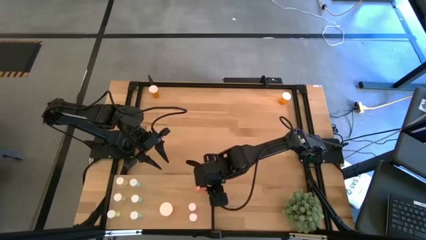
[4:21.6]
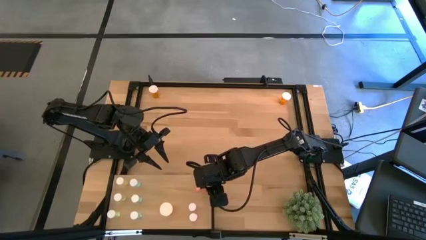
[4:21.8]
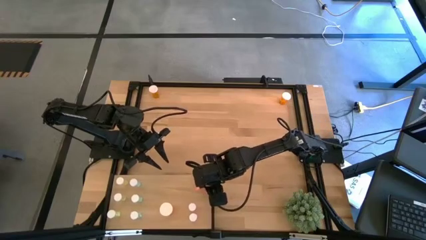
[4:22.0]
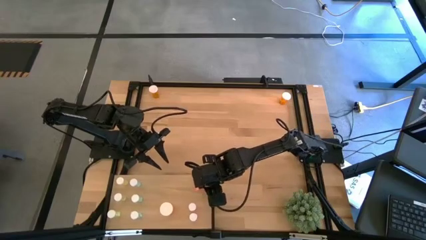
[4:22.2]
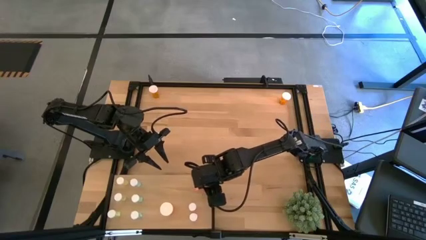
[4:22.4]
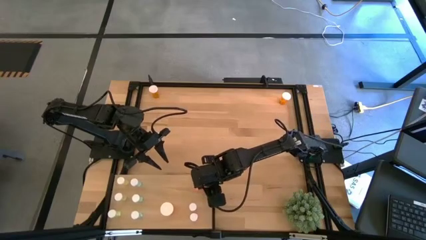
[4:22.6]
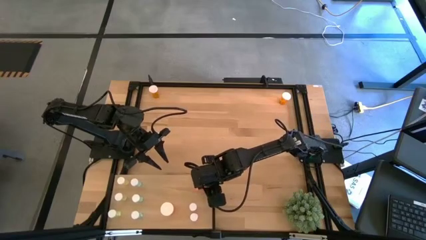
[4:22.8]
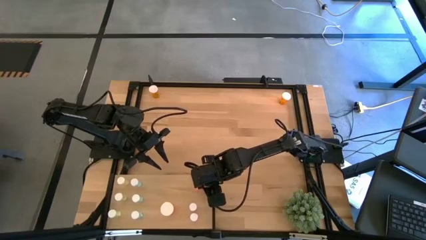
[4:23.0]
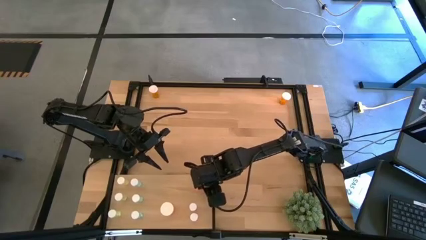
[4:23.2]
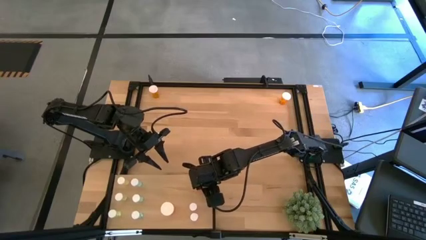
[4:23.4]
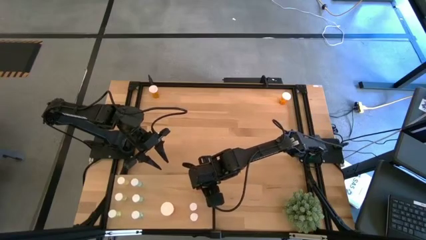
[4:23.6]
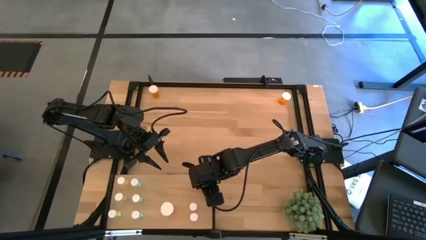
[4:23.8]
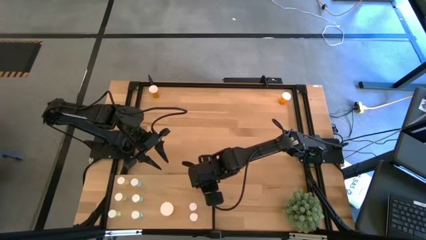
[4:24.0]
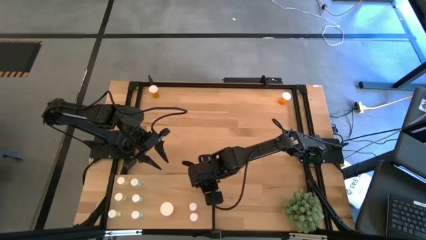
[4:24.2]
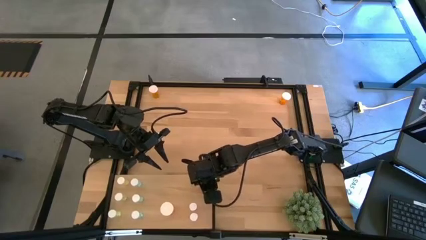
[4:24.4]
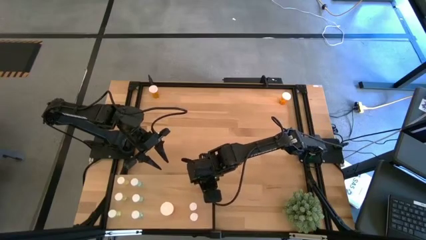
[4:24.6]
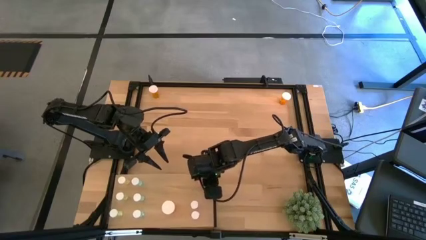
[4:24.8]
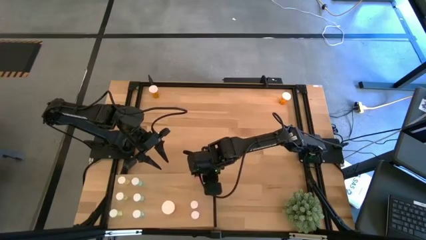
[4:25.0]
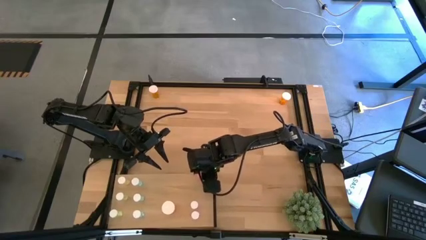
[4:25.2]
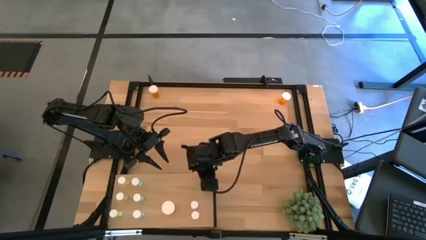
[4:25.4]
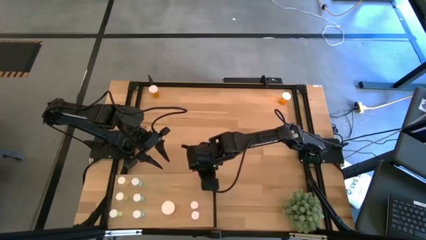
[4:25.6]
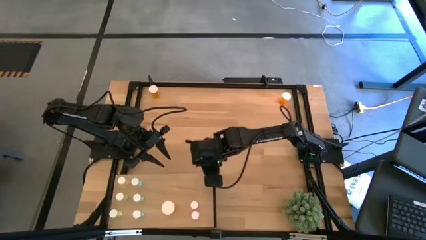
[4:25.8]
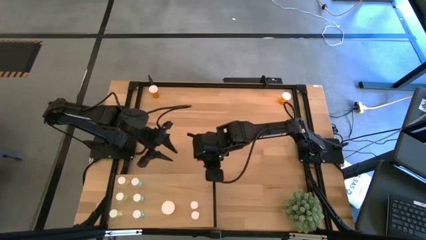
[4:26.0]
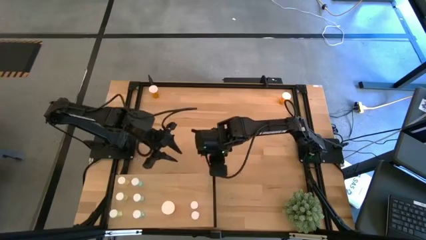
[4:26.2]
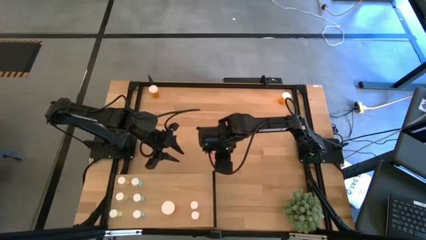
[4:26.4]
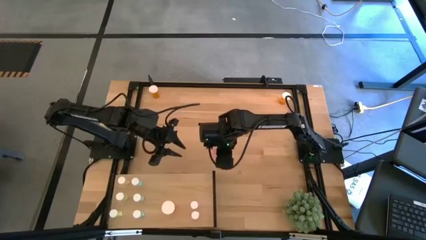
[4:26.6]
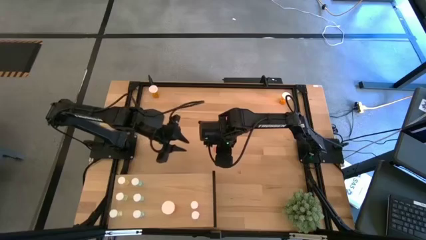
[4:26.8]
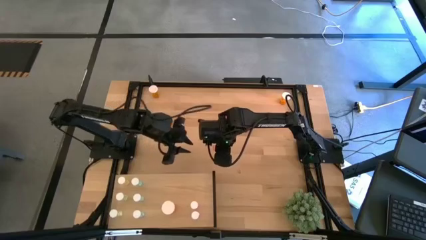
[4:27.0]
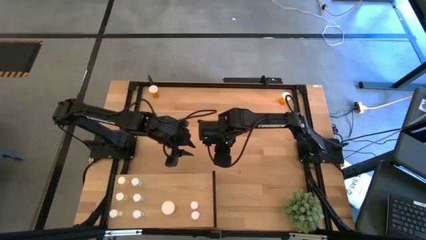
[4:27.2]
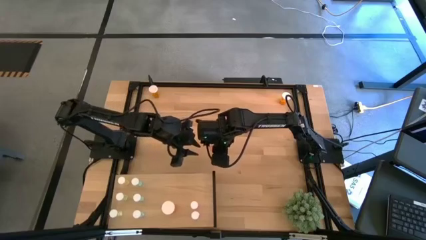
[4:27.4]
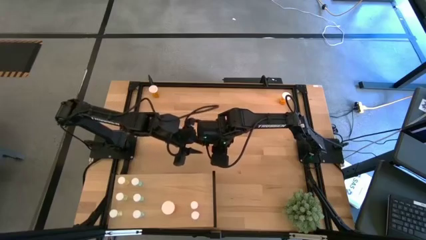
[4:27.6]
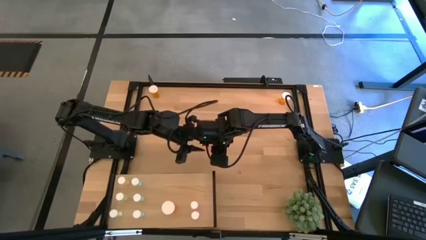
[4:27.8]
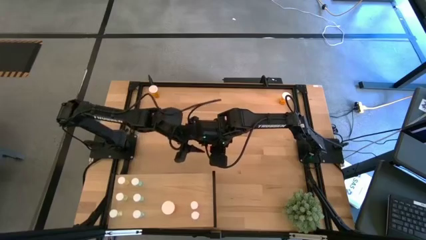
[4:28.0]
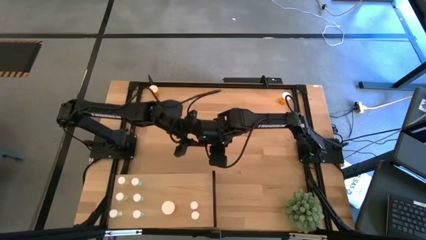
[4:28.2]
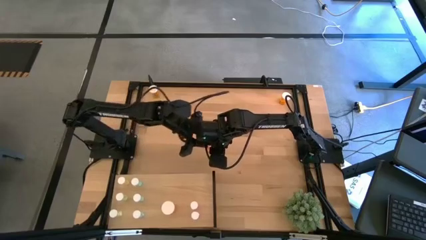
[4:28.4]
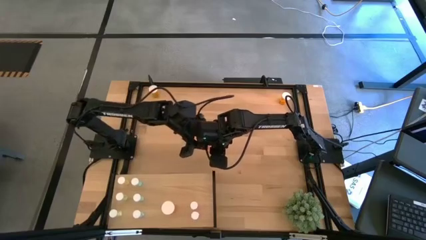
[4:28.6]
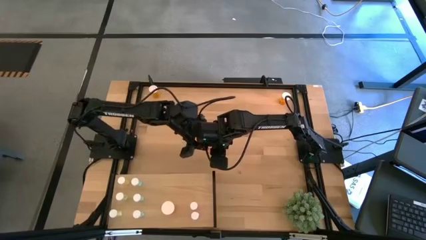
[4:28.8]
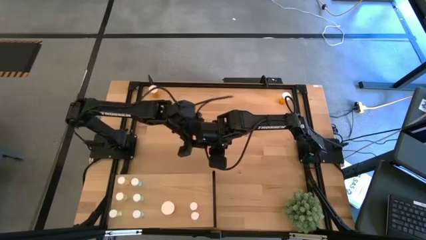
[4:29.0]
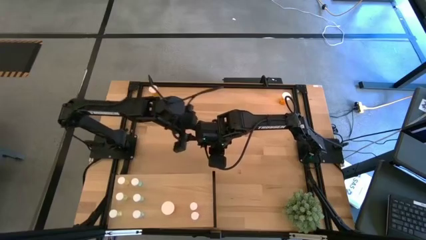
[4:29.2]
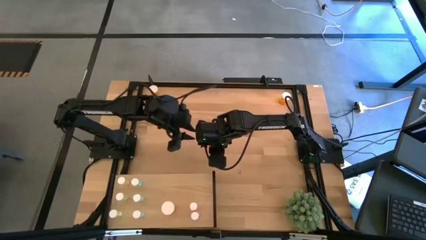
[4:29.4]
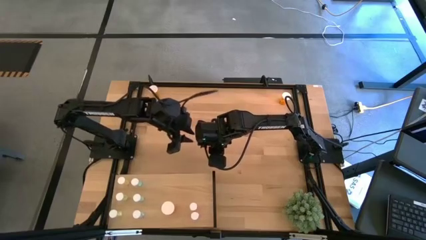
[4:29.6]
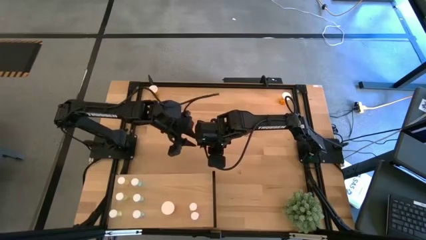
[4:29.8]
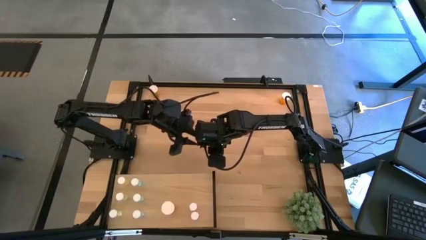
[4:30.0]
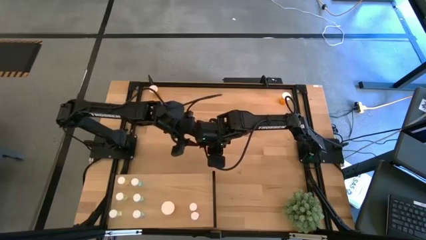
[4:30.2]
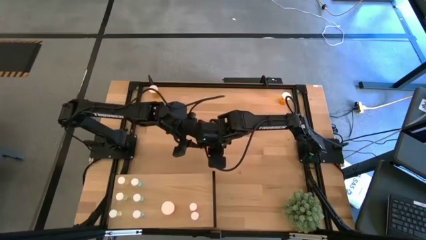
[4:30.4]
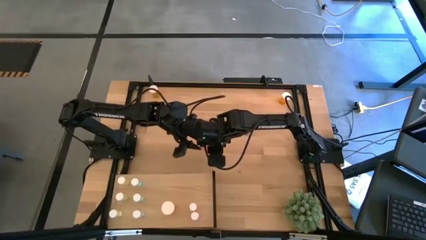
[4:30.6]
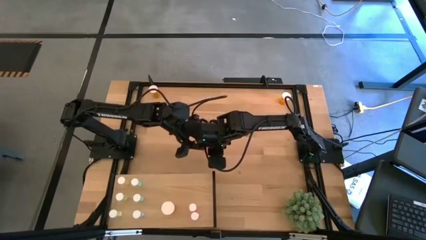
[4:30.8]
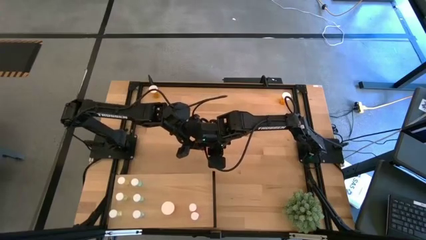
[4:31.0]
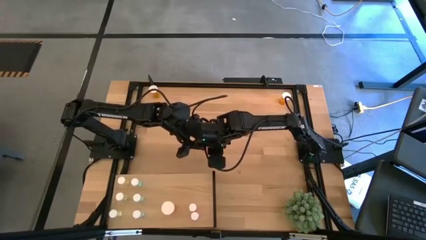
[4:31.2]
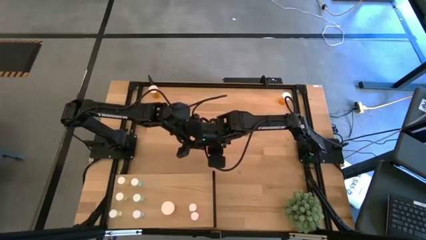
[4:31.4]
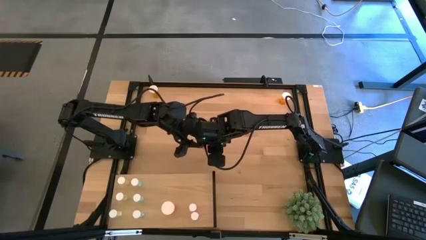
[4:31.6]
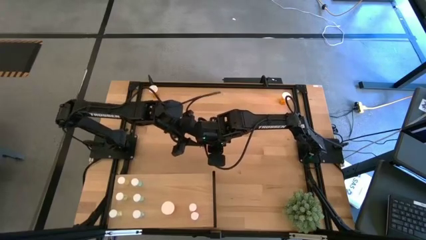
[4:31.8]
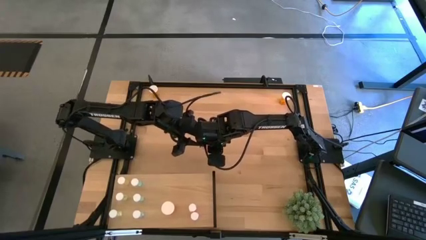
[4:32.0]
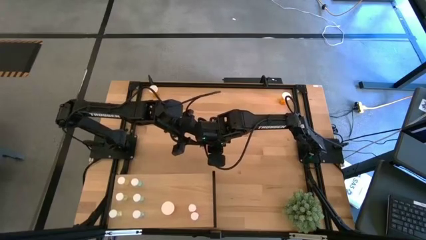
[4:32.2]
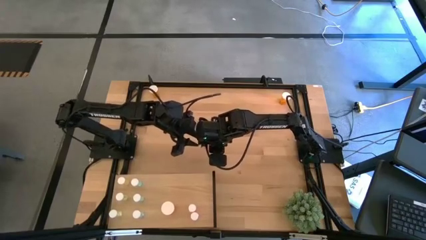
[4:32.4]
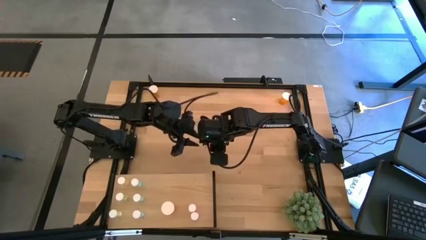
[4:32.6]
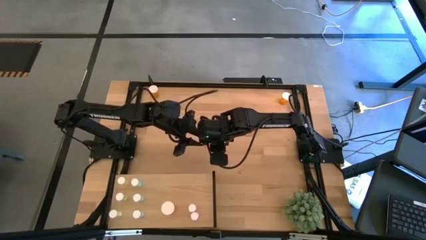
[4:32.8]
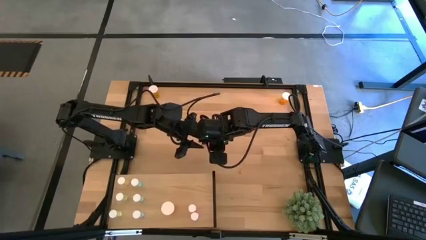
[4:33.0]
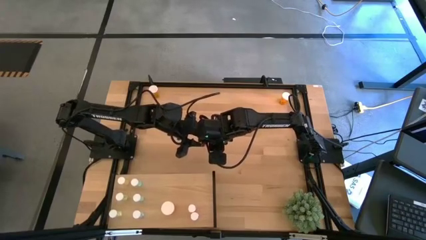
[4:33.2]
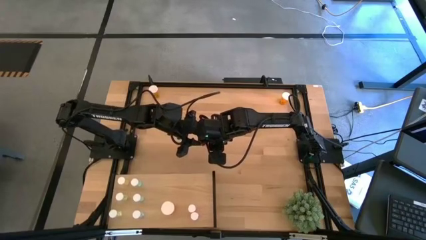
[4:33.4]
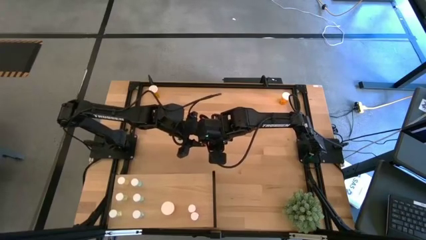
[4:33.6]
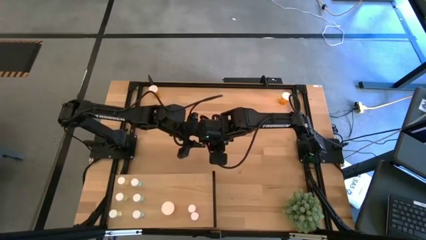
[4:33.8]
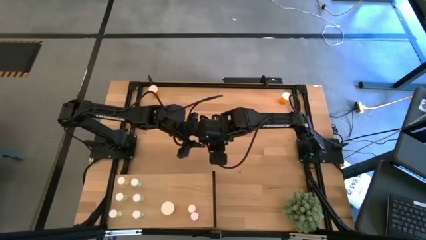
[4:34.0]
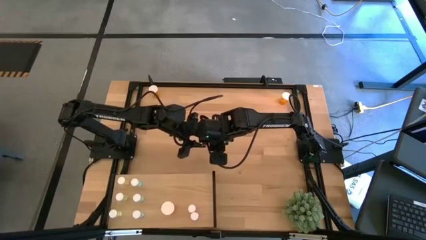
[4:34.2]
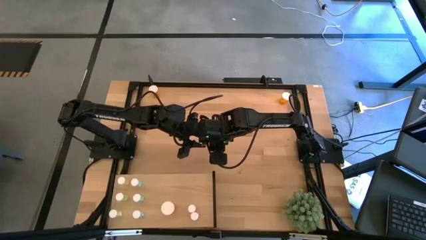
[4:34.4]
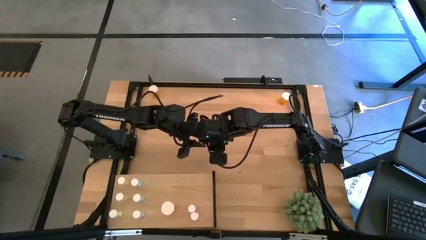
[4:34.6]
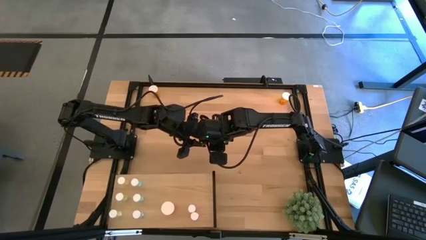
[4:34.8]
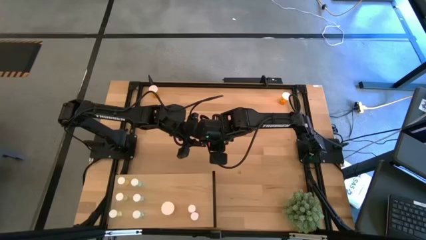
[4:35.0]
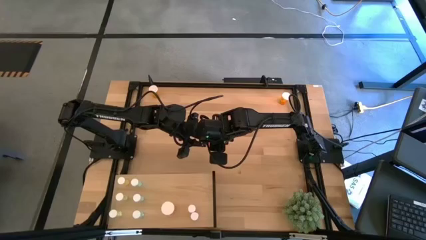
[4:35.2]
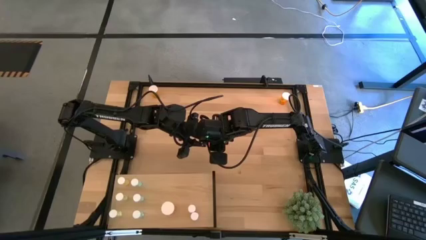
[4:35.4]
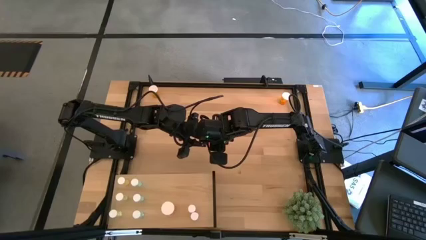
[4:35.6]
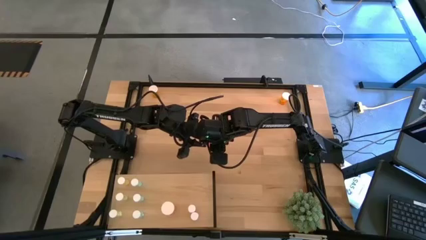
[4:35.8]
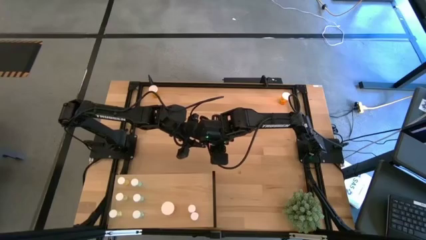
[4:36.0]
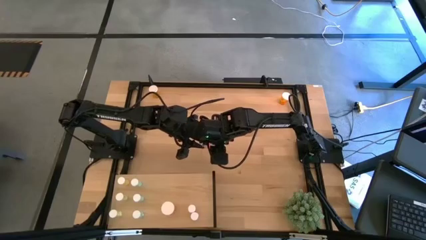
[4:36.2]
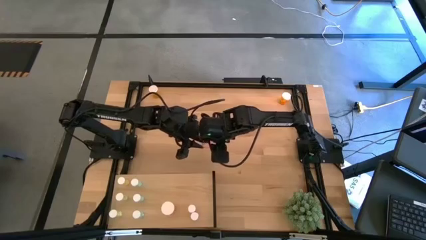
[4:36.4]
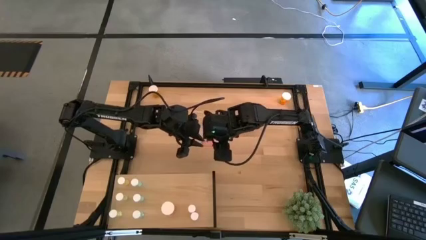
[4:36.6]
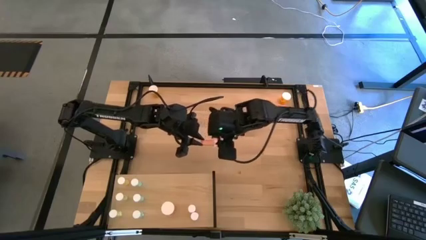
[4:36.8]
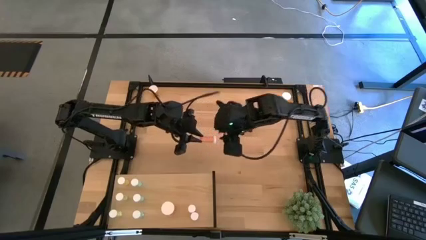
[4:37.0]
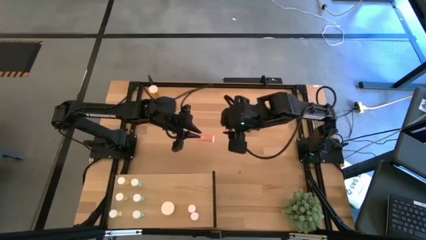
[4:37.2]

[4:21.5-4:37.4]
Task: Pick and place medicine bottles onto shelf by color
Put the pink pill bottle on the shelf aligned with the other pink pill bottle

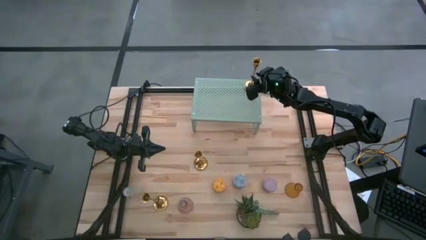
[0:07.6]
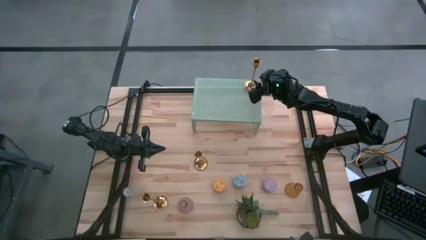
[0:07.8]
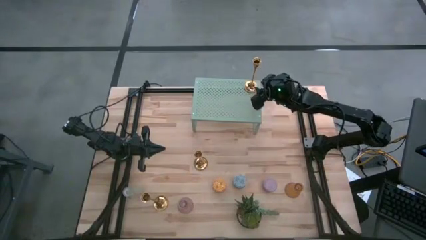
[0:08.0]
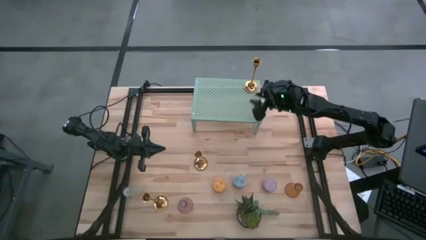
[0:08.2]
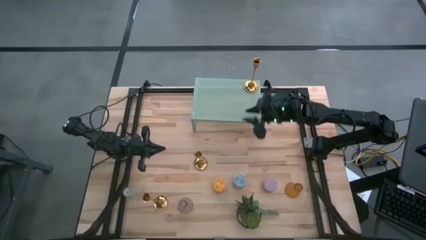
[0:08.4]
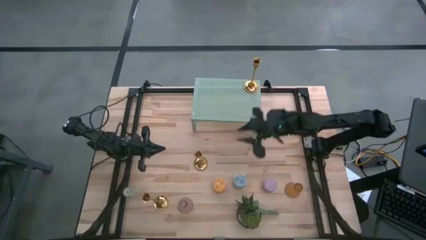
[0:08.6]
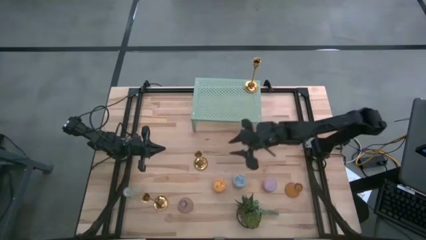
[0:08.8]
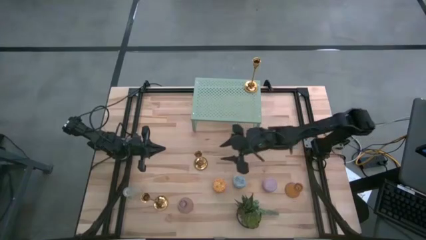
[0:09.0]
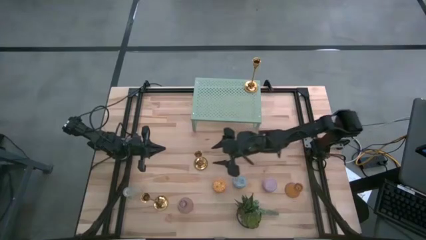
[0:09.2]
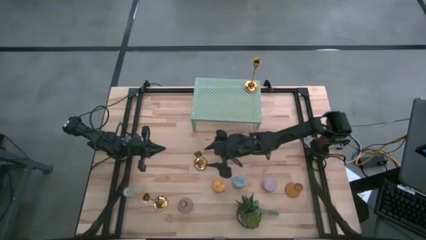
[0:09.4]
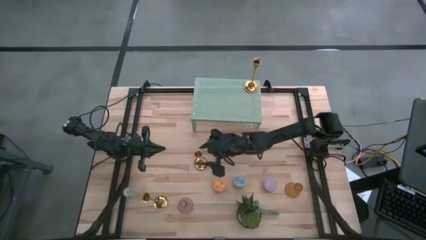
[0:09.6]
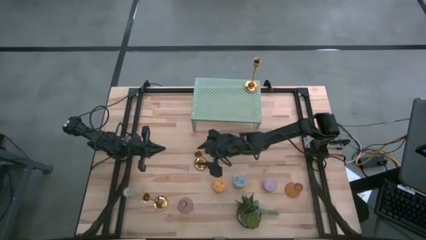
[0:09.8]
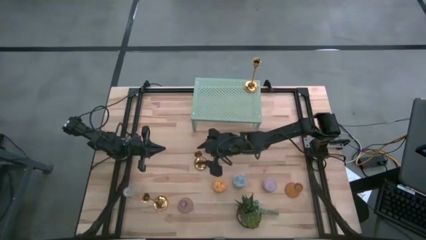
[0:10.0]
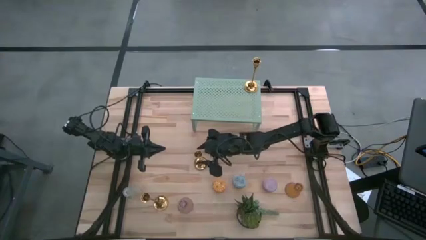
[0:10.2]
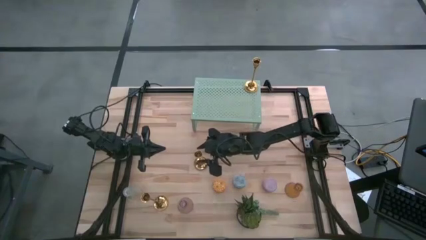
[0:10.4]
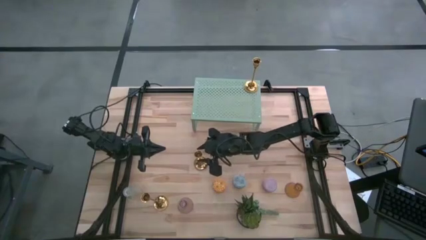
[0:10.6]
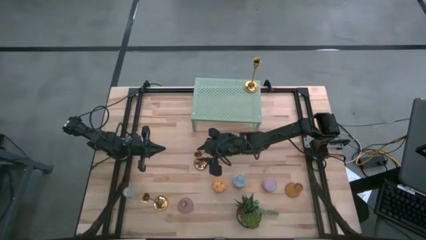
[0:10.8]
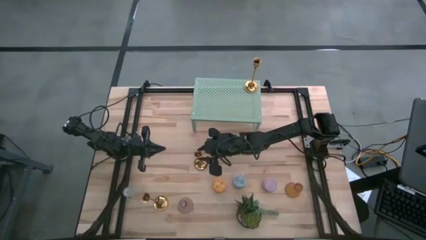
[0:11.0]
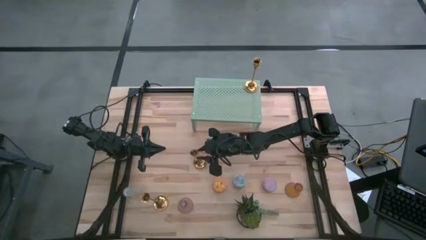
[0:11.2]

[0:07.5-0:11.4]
Task: Pick & Place candle stick holders
Put the top gold candle holder on the shelf
